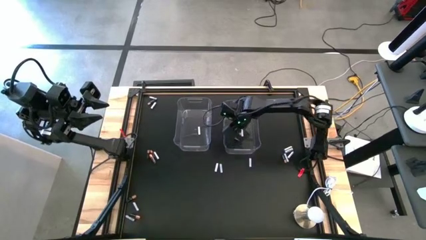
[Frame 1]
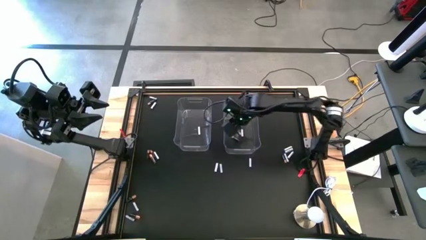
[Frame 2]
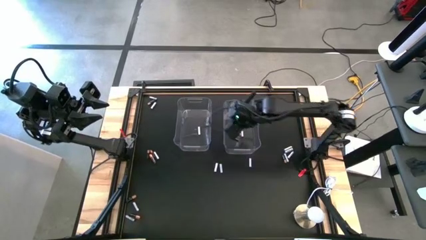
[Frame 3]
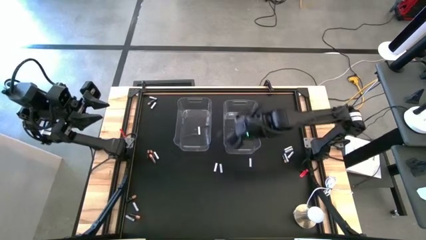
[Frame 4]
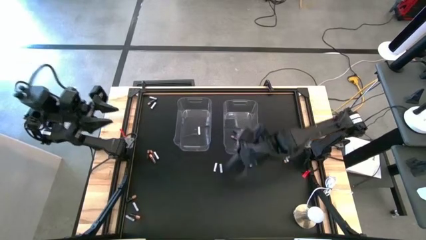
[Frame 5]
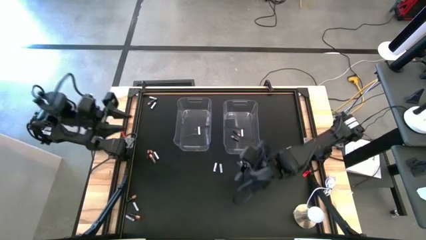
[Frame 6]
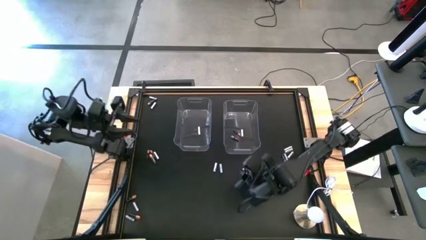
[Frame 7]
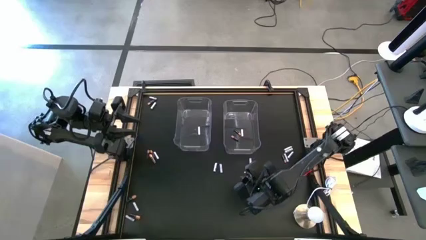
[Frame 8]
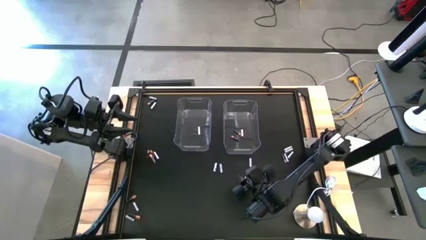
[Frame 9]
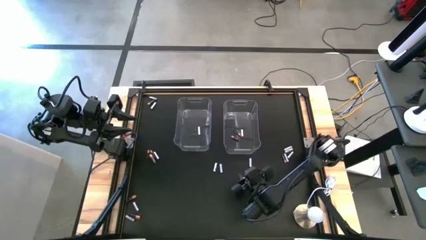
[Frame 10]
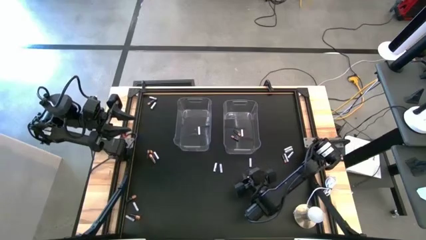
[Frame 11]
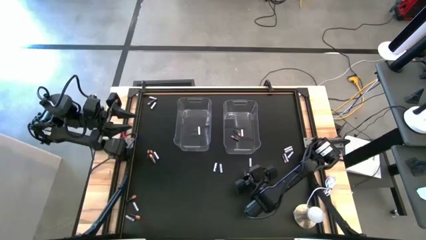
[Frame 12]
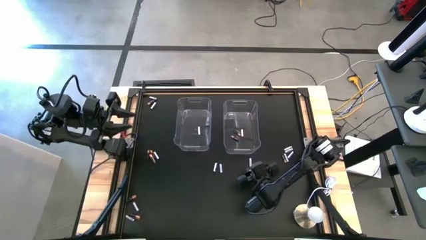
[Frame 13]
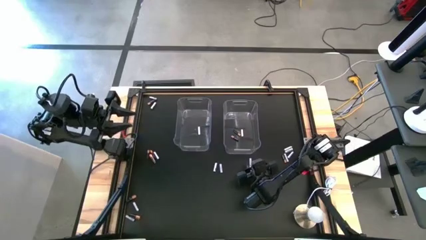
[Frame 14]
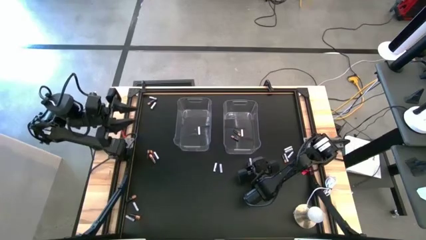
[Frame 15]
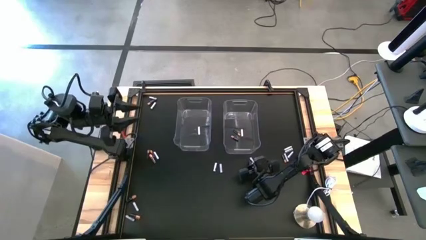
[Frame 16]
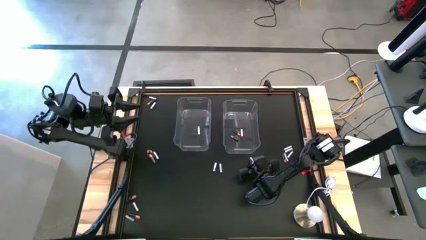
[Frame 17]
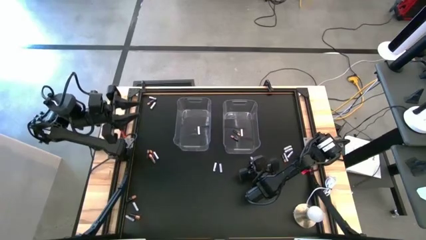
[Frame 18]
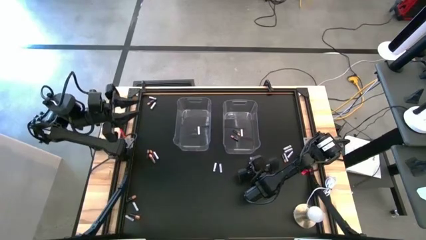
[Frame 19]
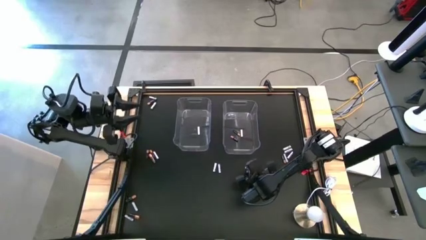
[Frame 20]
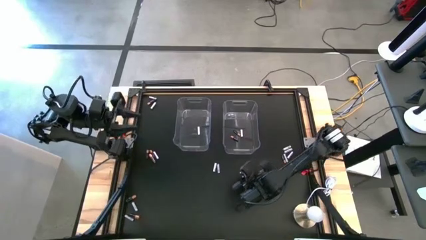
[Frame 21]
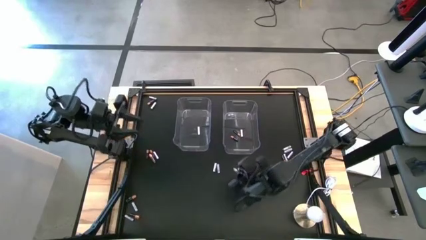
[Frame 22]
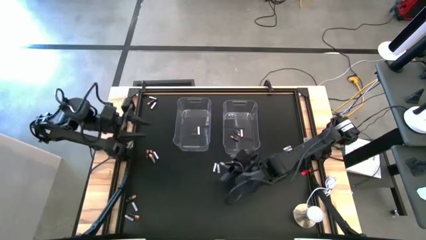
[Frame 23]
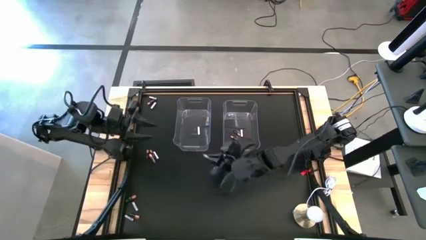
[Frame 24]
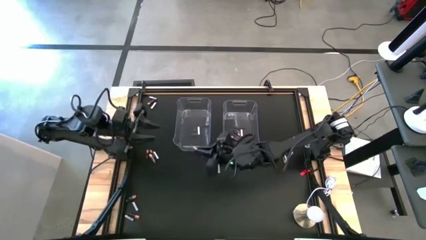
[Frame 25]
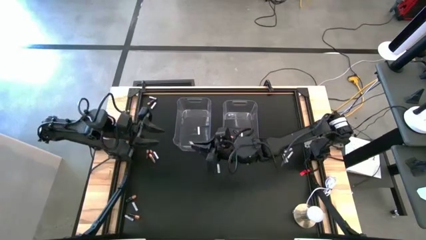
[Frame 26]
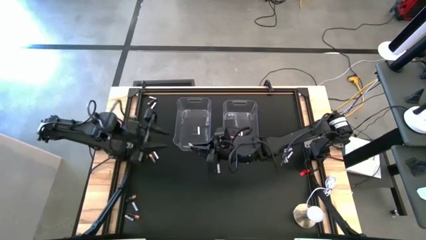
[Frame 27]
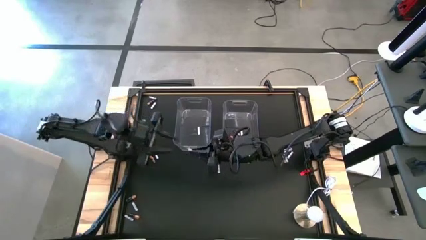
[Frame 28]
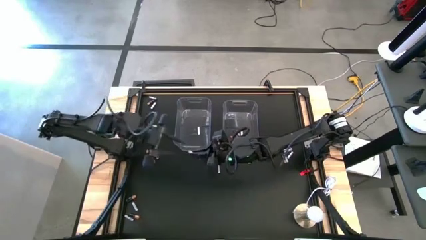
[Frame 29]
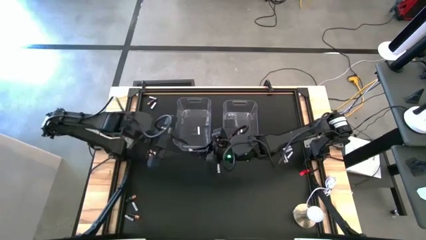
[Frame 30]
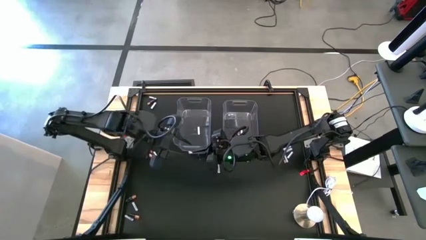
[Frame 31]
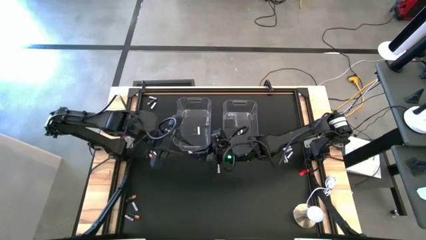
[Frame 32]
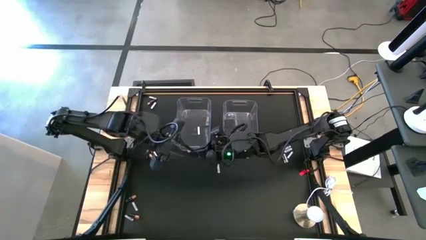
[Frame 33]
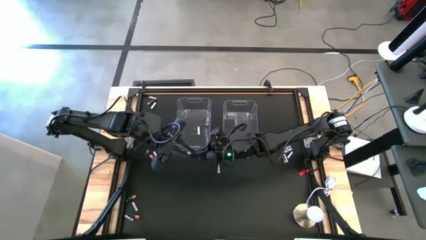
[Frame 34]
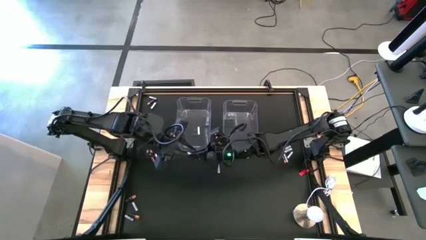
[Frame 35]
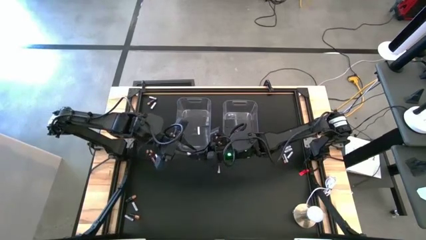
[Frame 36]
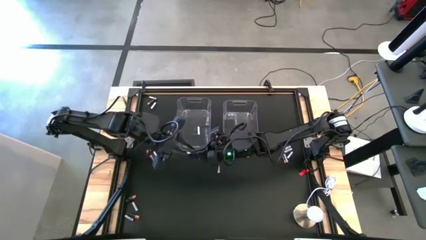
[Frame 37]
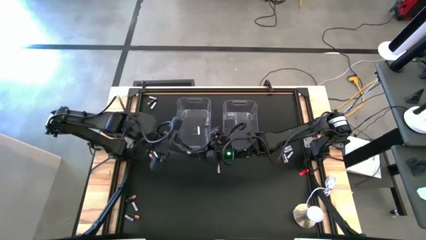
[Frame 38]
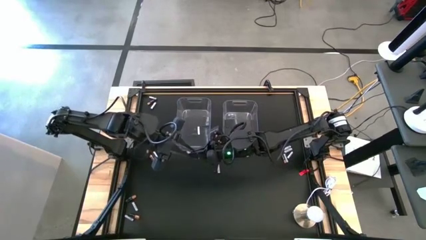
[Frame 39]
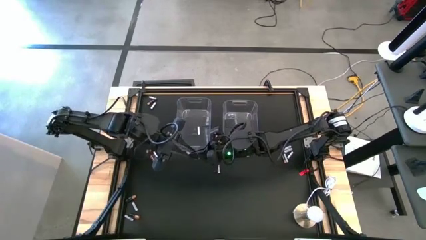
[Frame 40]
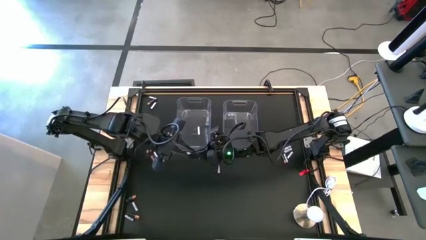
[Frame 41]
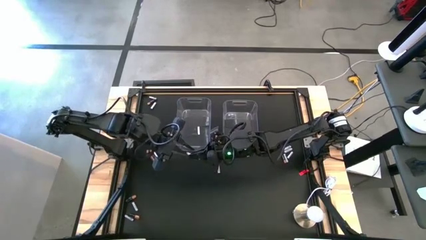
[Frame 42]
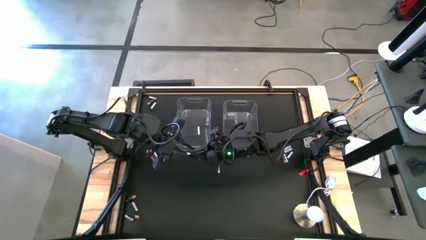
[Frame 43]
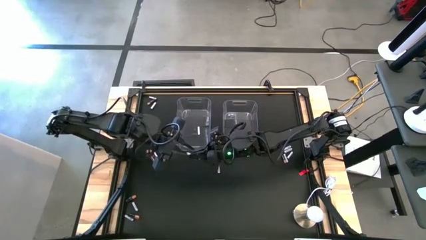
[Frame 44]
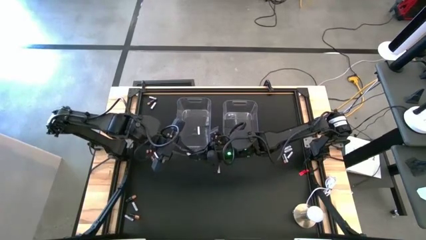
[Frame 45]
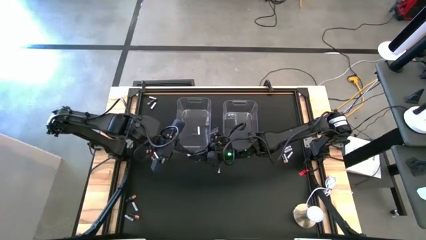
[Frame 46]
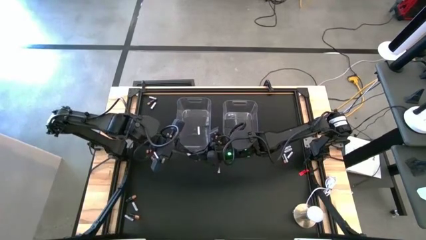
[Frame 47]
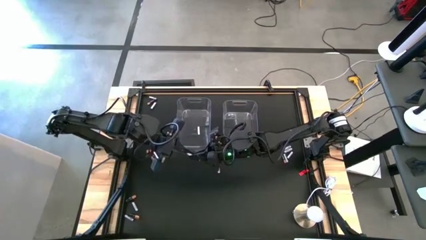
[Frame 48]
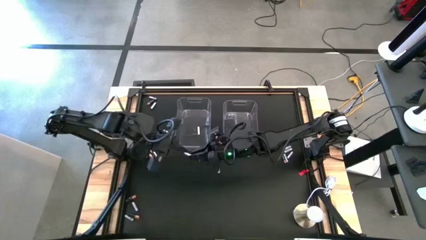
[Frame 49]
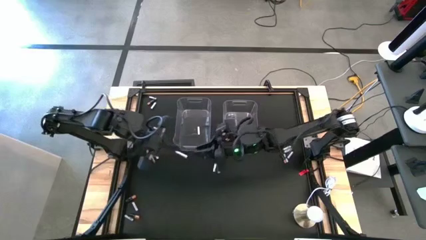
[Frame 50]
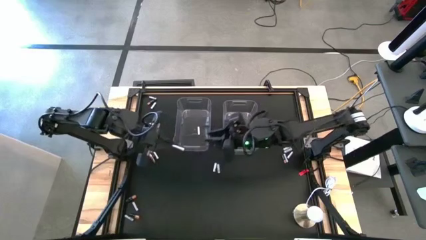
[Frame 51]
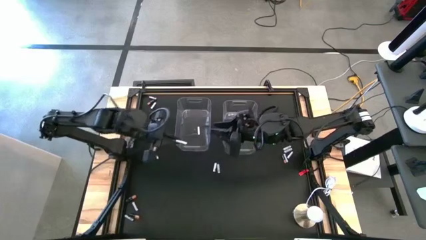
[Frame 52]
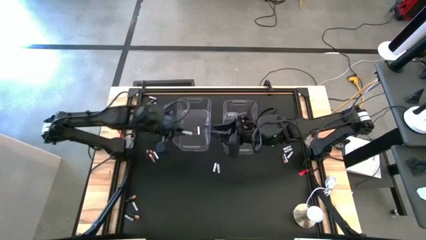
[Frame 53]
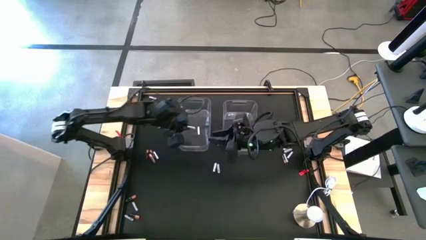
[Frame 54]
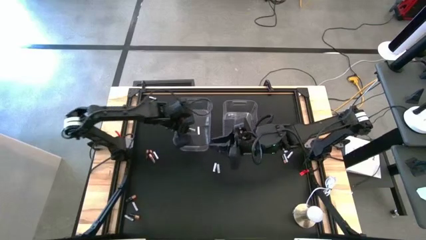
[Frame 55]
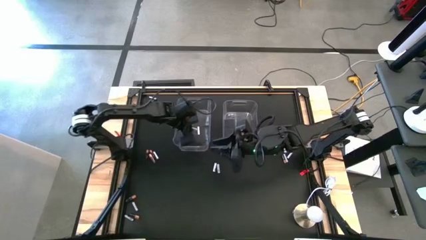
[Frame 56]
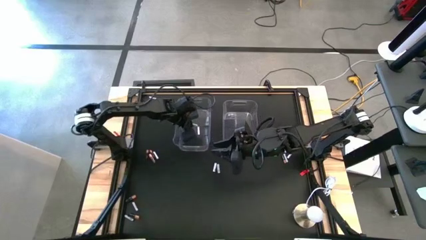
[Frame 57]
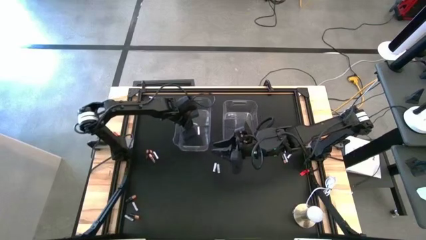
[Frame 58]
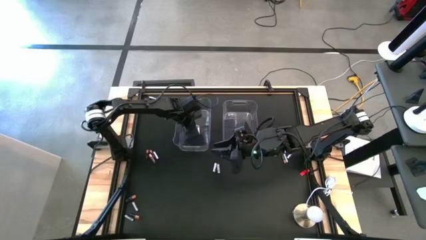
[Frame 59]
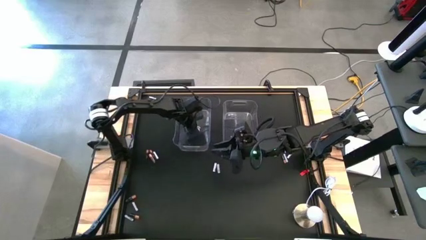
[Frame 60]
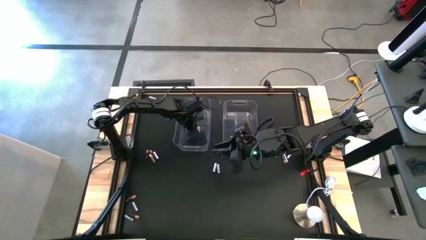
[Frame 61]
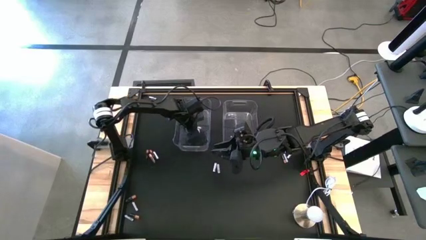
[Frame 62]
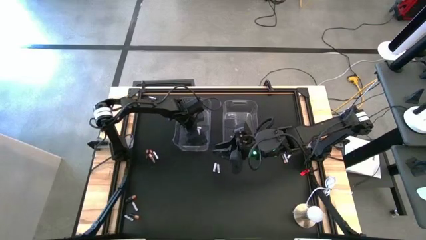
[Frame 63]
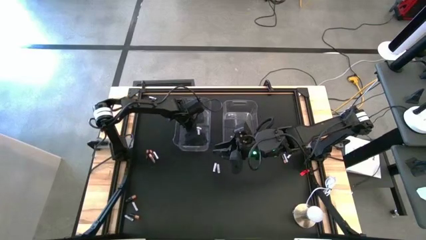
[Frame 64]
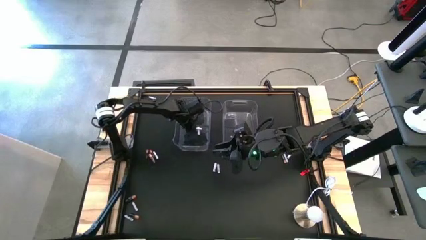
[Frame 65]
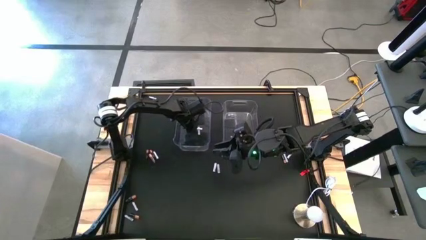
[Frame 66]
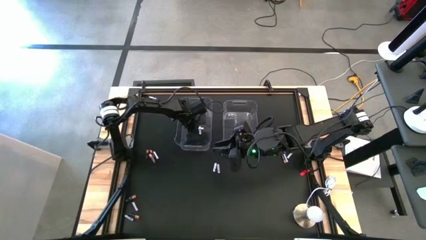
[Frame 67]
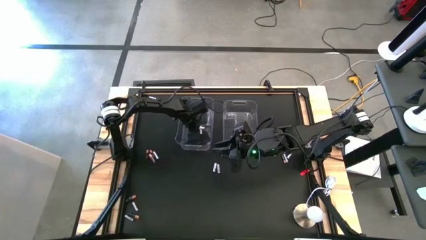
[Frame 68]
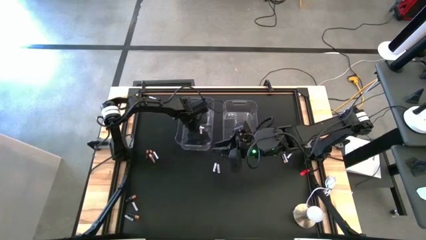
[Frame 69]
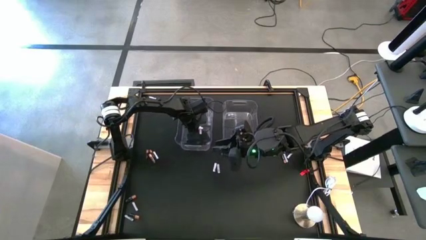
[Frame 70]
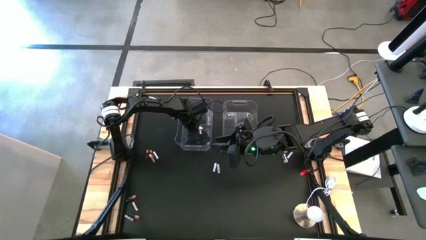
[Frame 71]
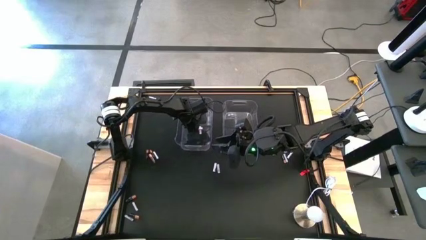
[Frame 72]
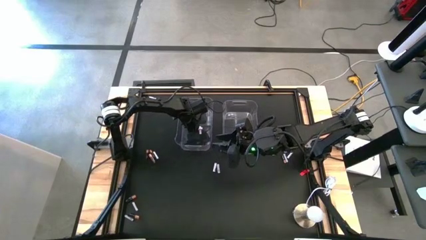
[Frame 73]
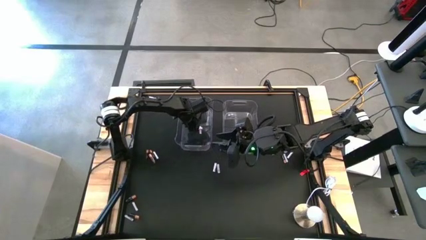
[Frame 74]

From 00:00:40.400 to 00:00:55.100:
Task: Sort batteries
Put the white battery into the left transparent bin
